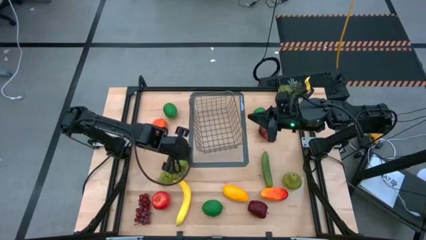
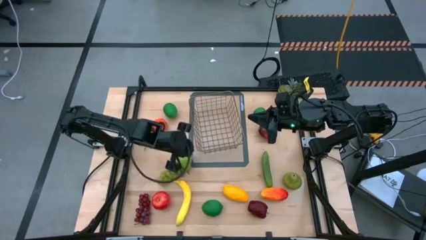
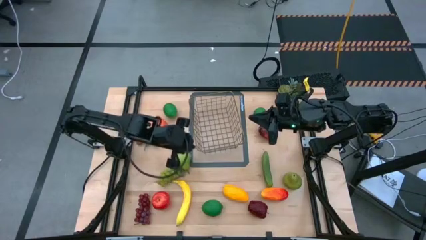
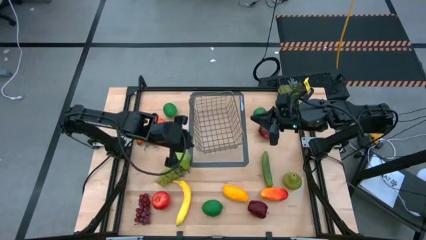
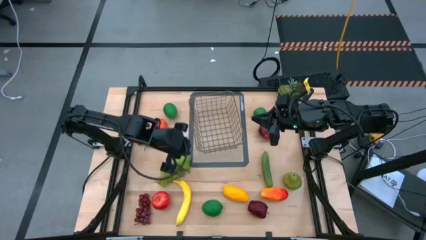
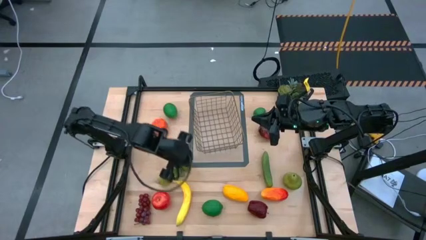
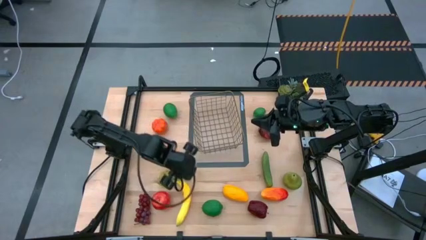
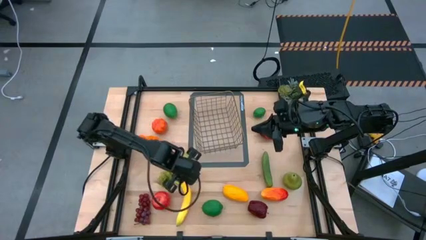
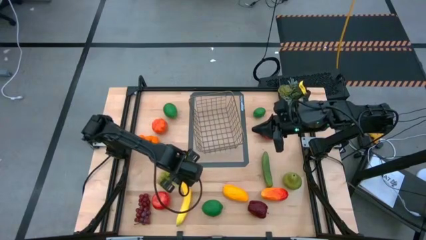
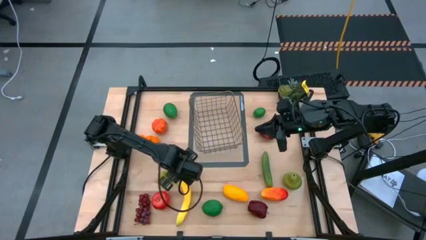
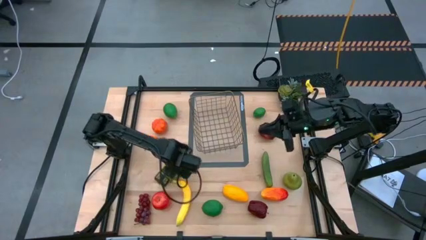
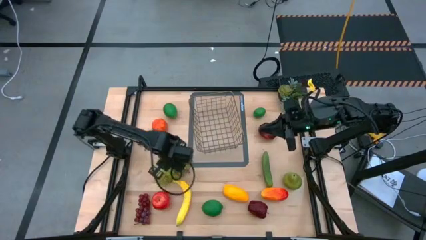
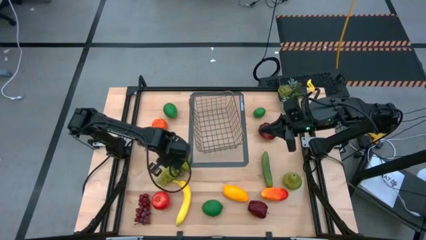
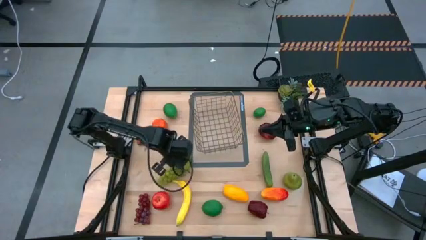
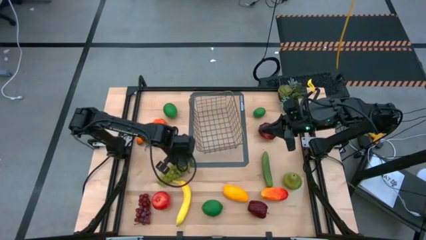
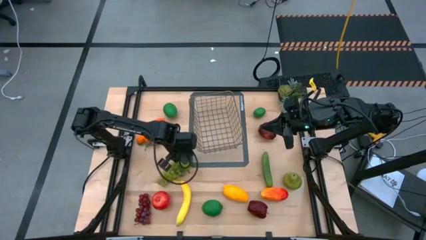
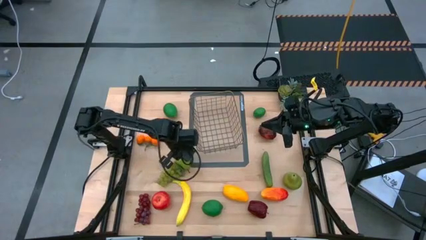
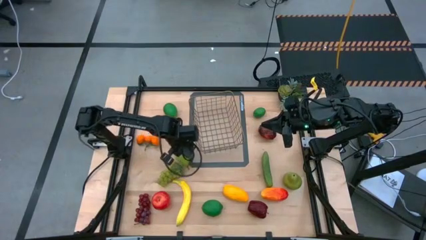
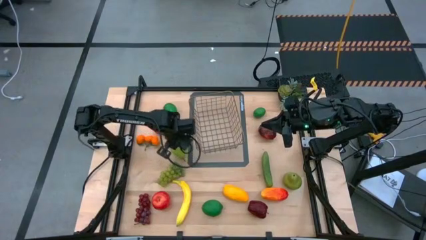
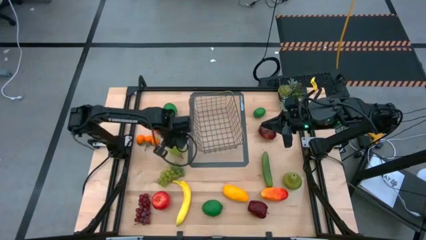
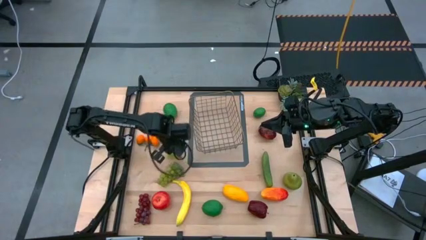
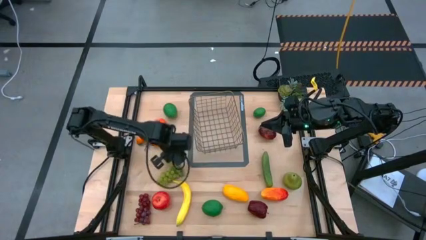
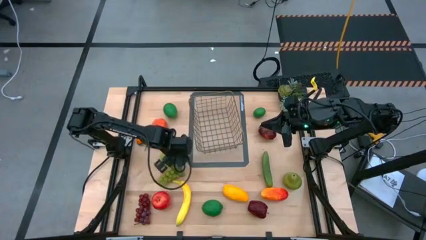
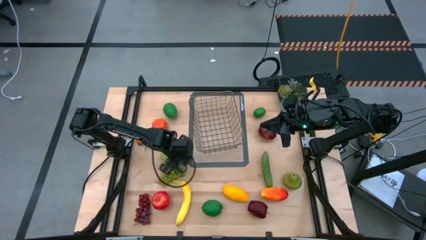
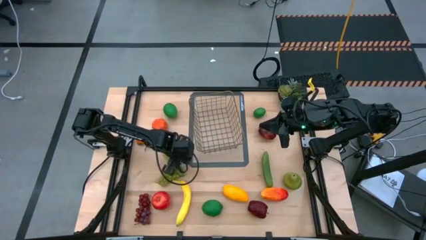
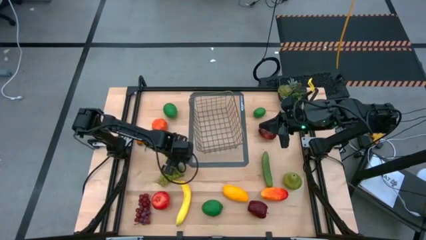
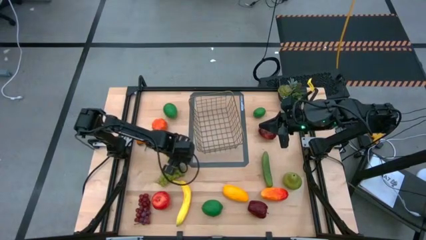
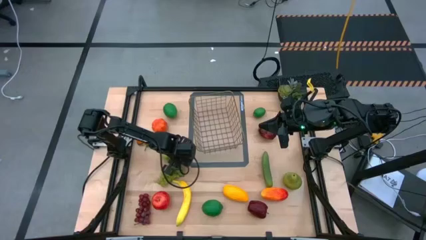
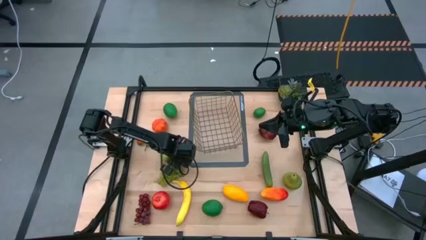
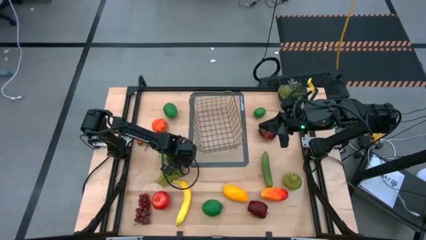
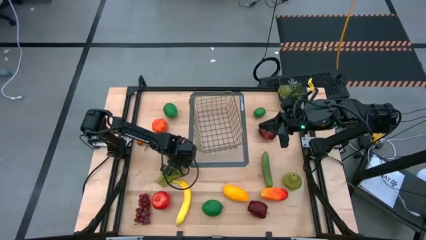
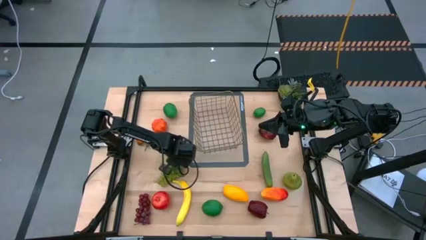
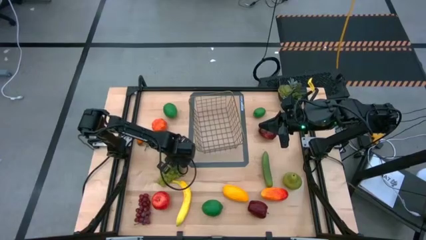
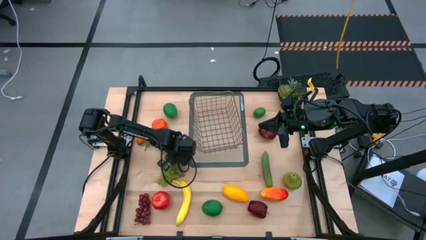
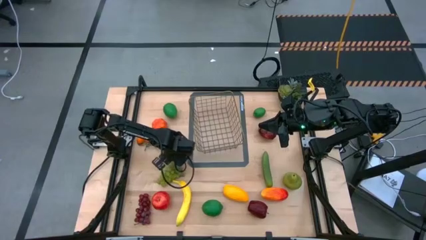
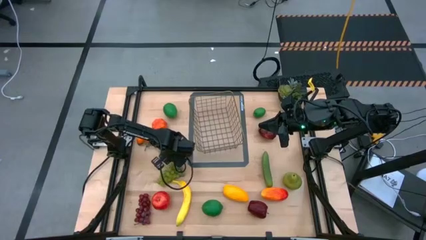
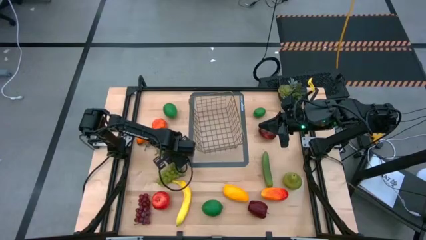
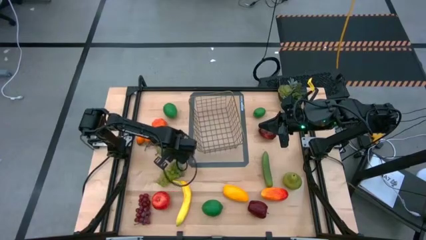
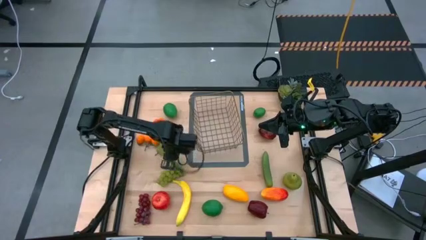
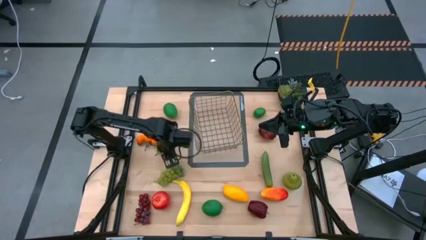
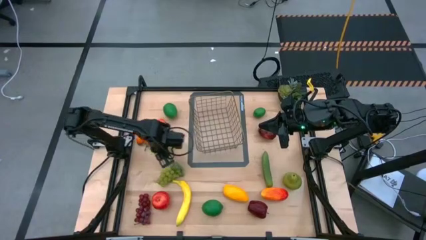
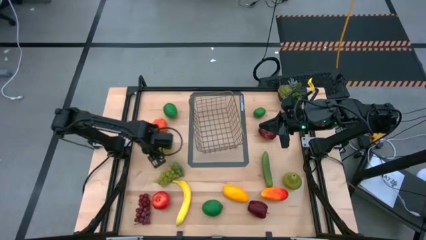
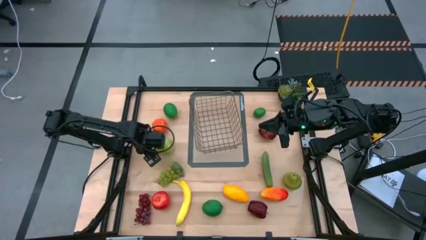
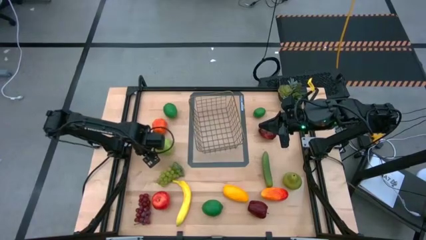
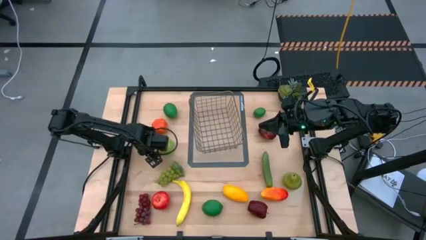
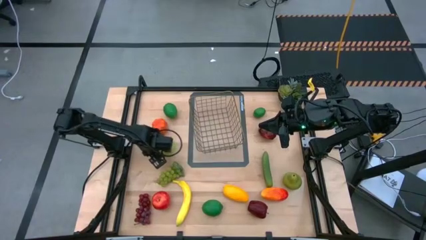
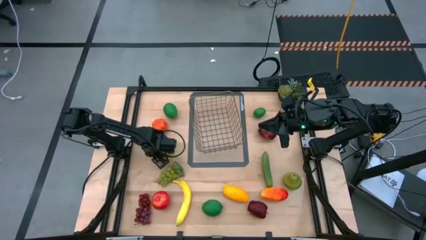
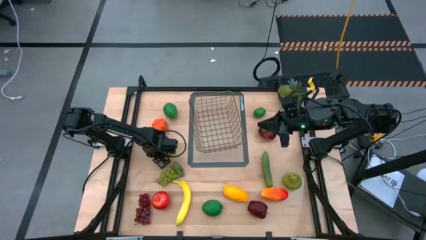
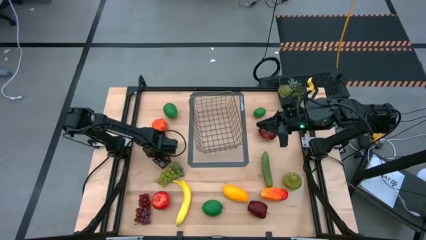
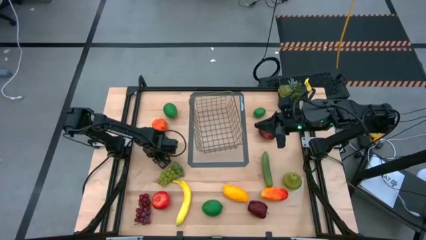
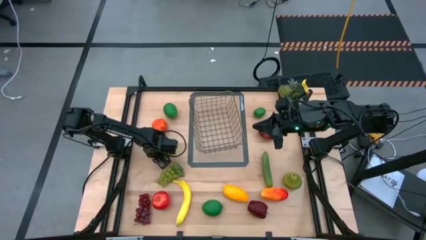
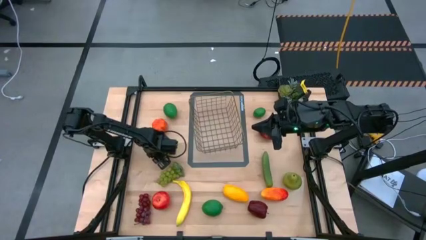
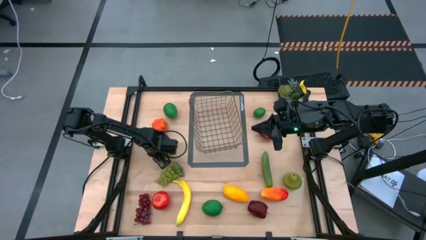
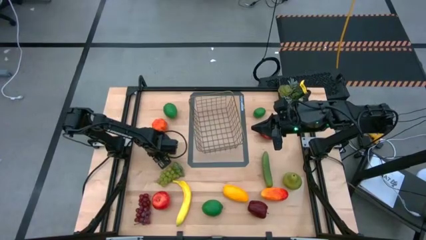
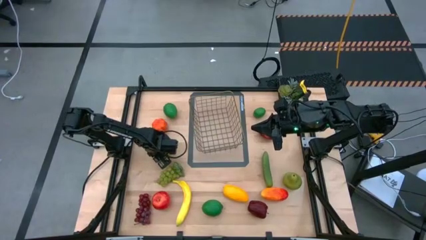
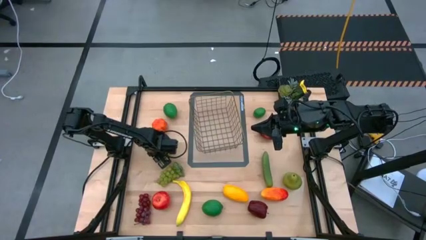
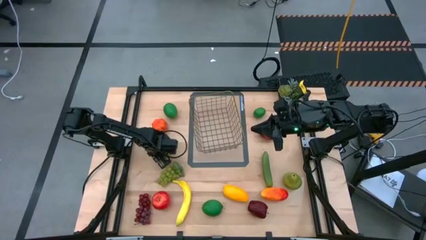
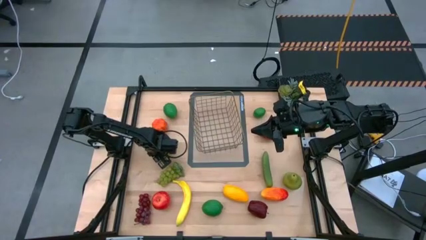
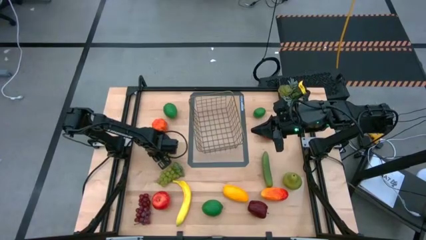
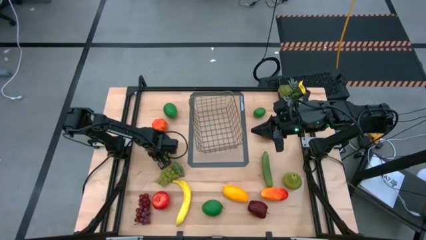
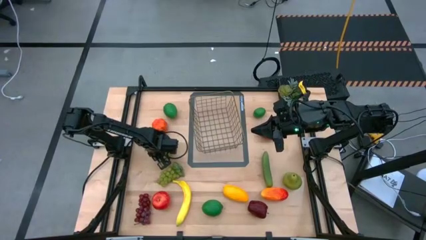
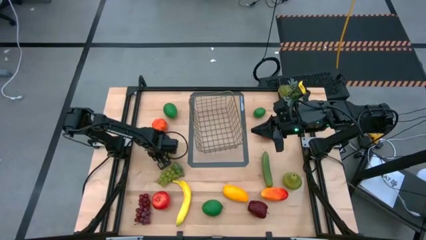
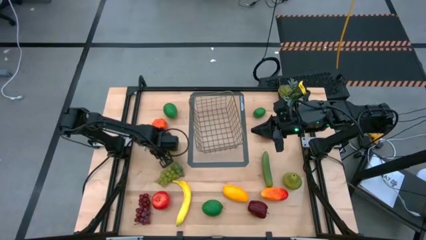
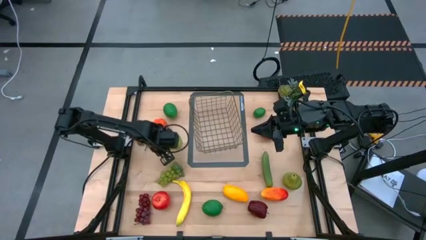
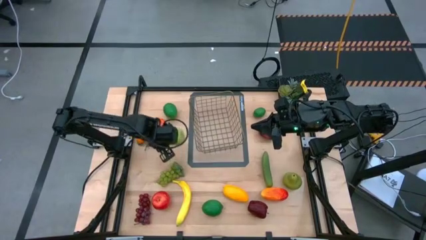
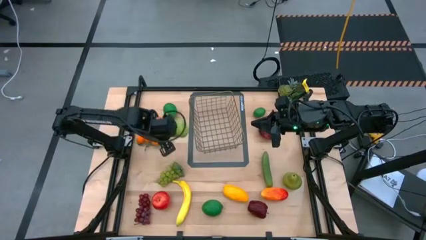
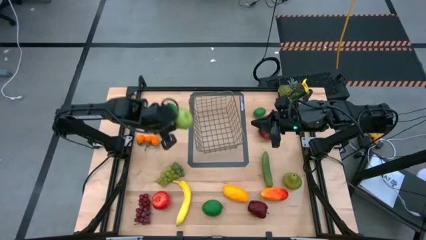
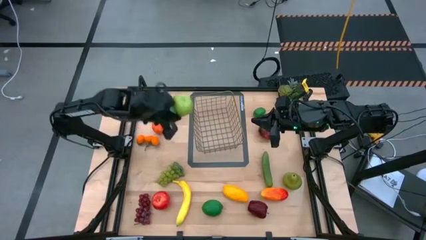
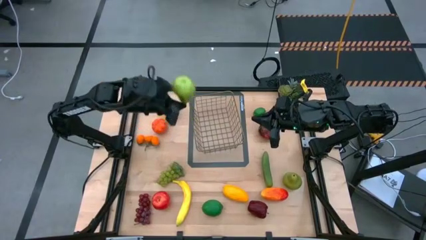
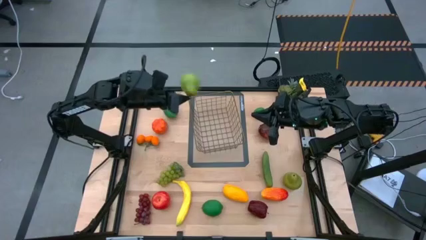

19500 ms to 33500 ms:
Task: Build produce basket
Put the left green pear into the gold wire basket
